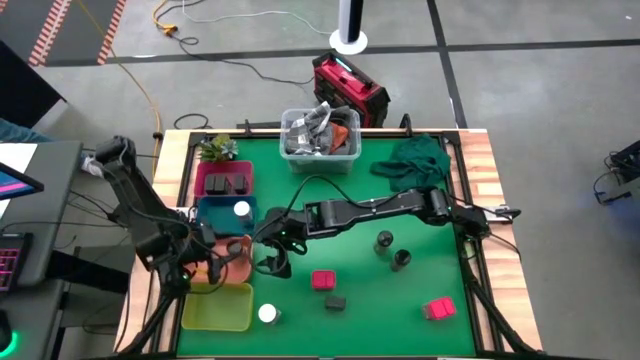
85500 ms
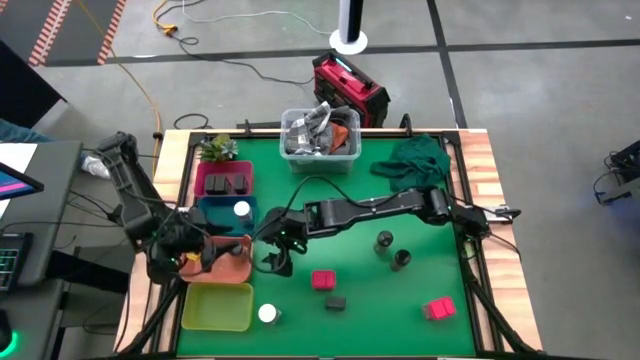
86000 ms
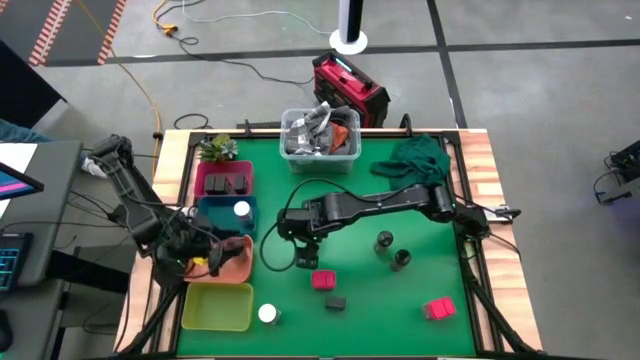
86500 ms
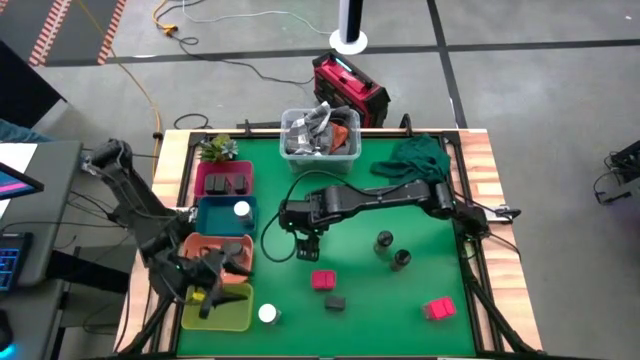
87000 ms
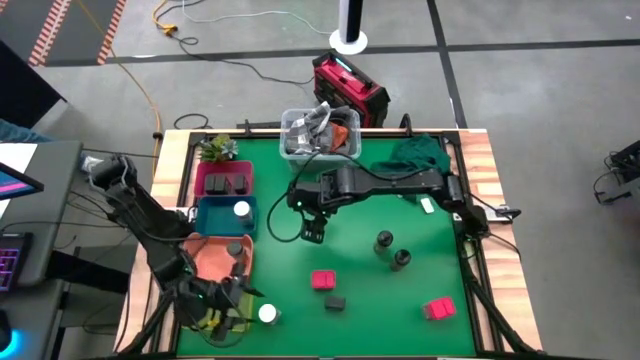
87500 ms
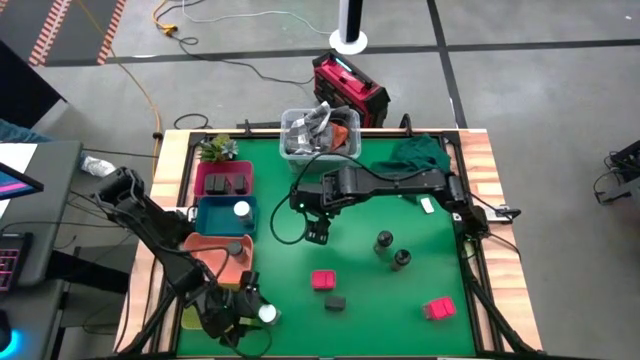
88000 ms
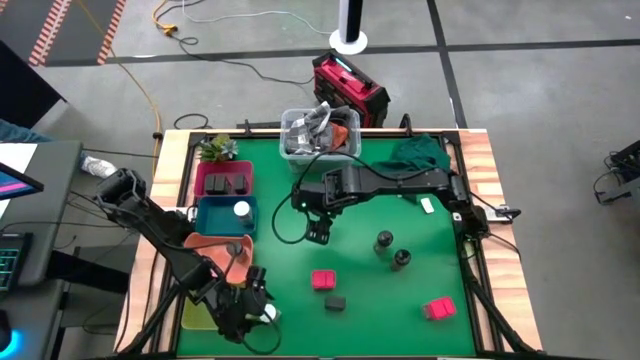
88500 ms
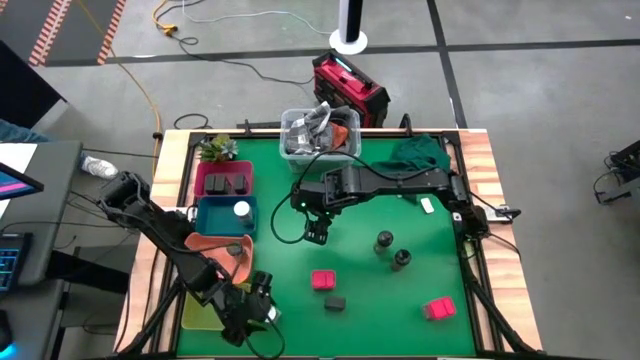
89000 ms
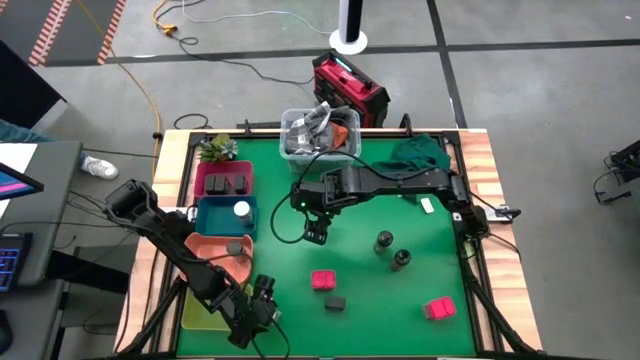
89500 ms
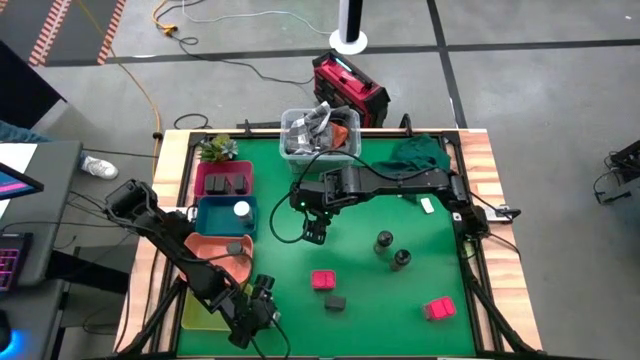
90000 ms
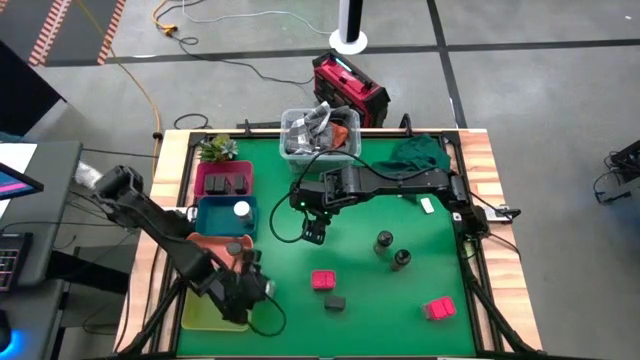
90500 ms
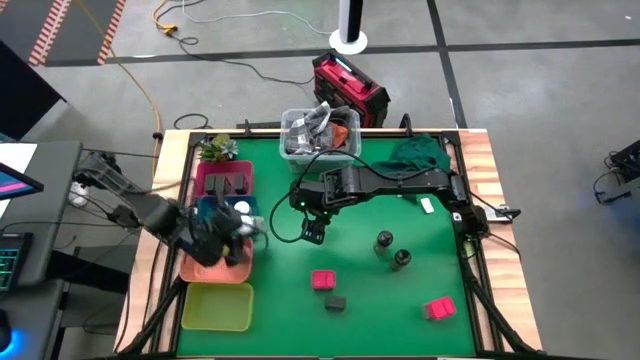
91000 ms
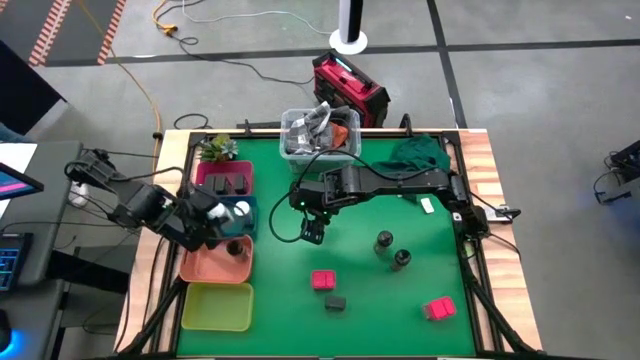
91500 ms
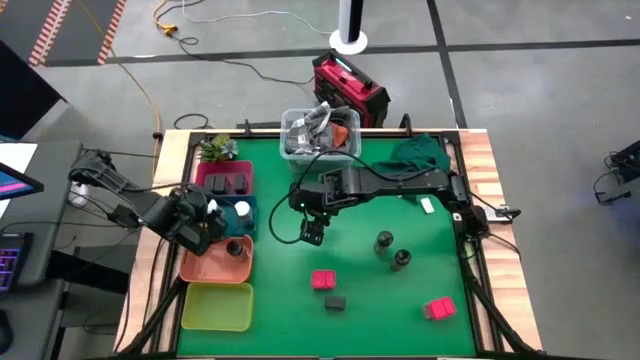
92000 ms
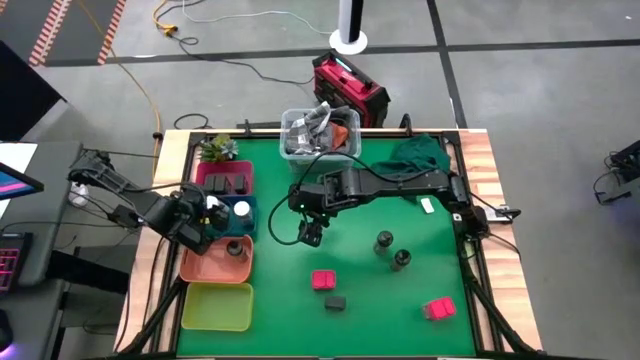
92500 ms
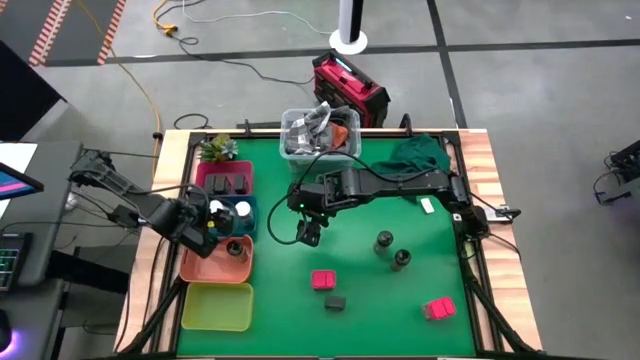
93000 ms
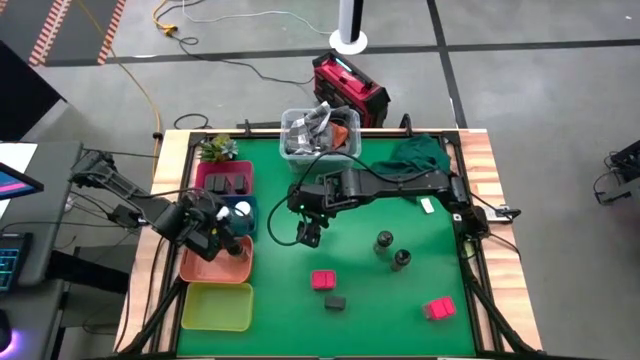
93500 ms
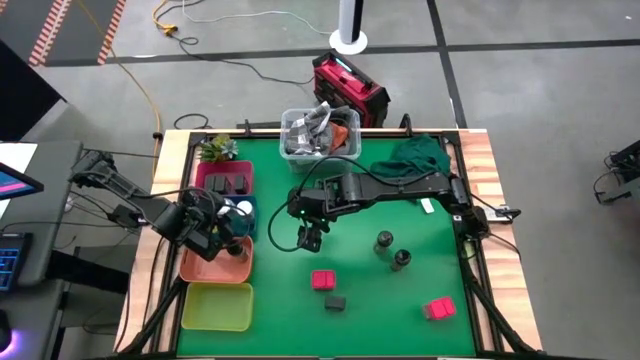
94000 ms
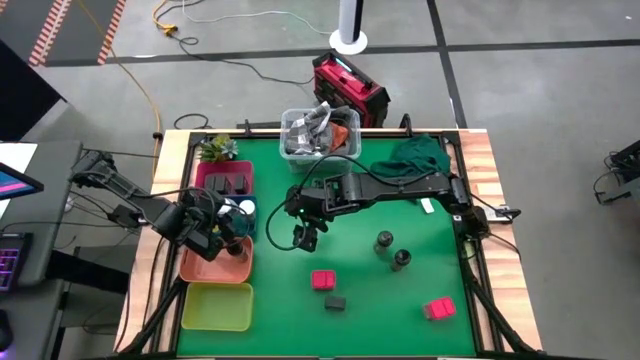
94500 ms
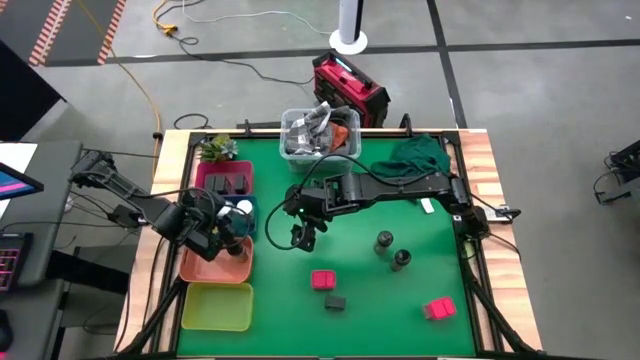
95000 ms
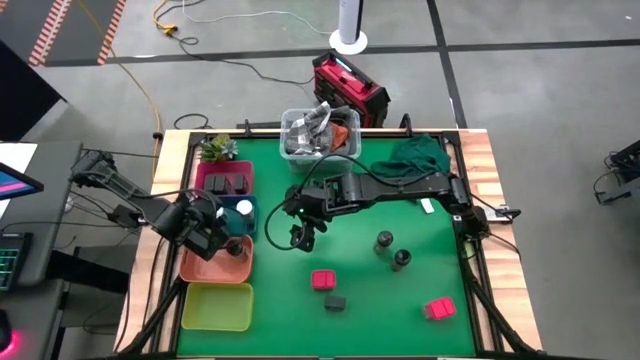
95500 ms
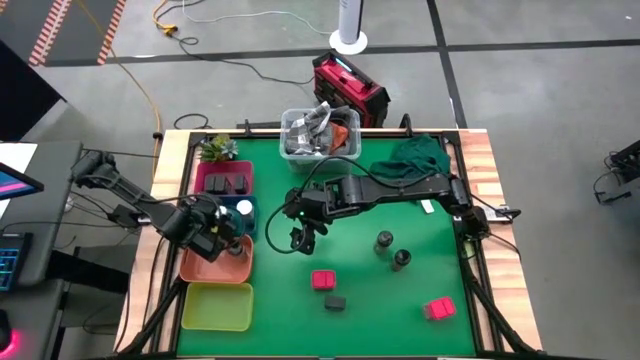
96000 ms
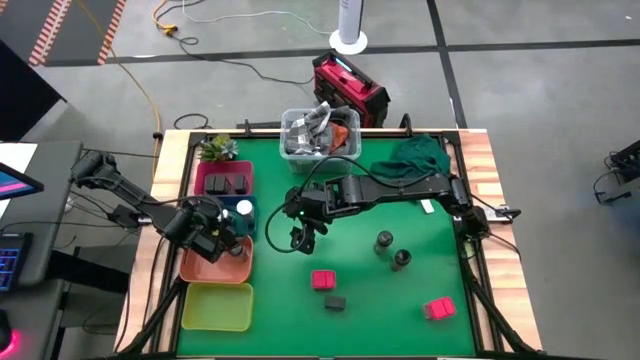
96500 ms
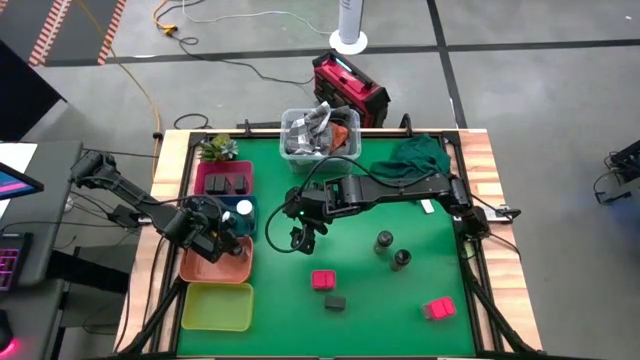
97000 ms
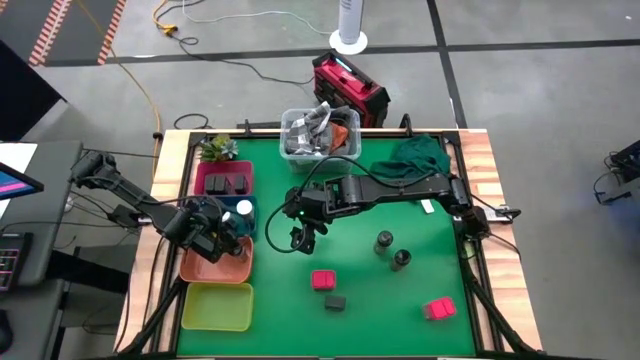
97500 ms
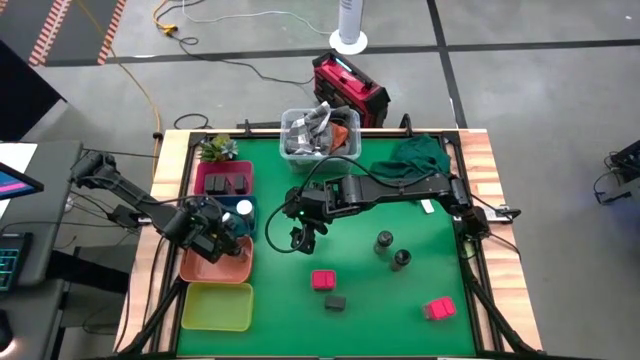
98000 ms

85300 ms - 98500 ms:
Task: Sort spices by type
Put the white seasoning bottle into the blue bin

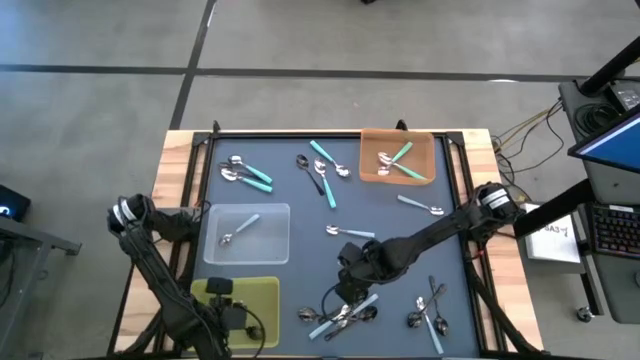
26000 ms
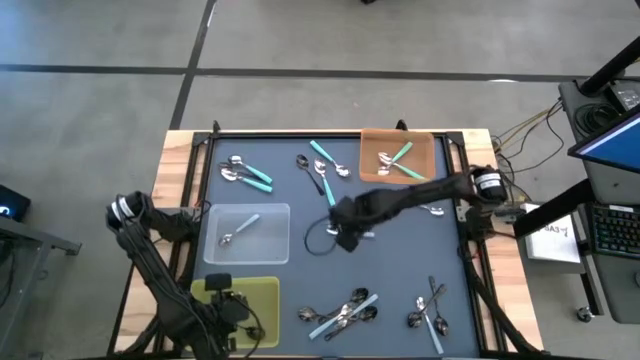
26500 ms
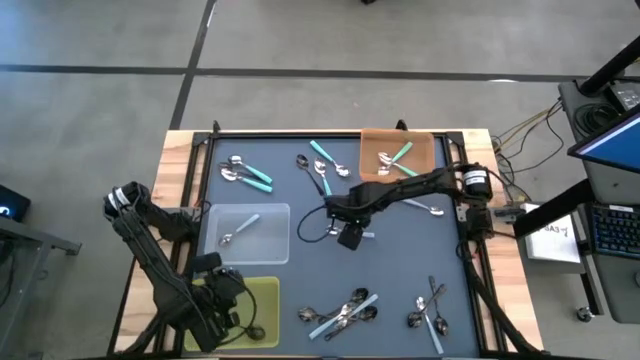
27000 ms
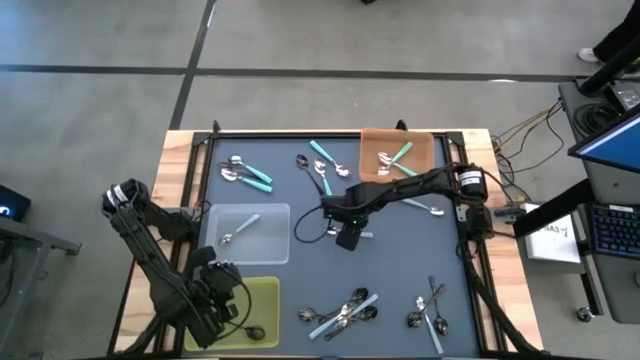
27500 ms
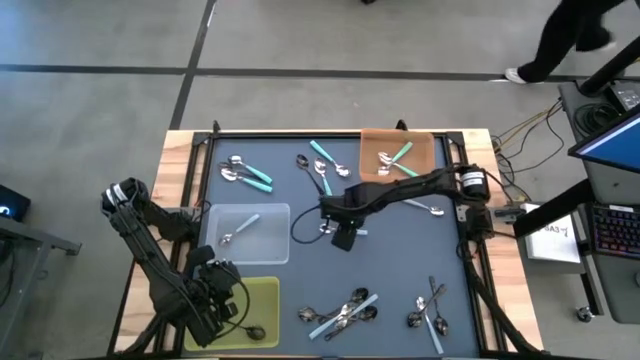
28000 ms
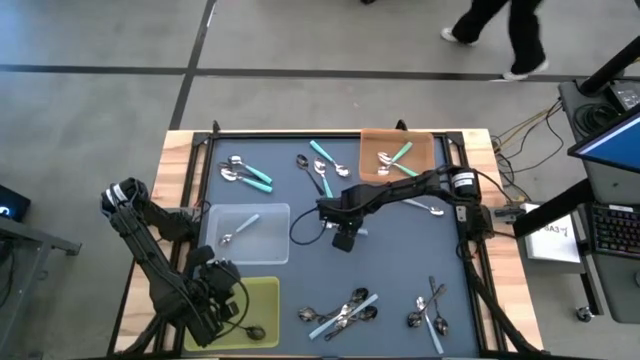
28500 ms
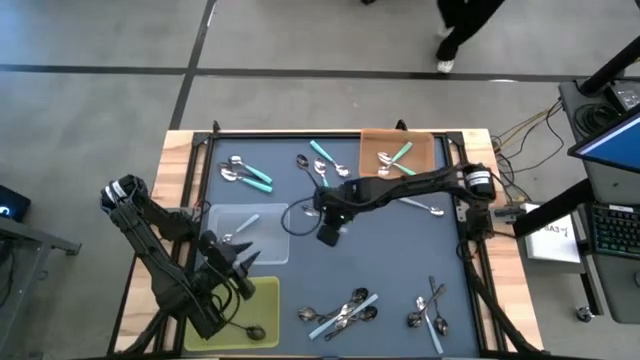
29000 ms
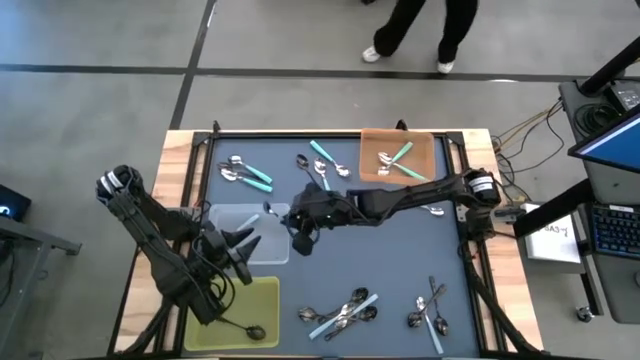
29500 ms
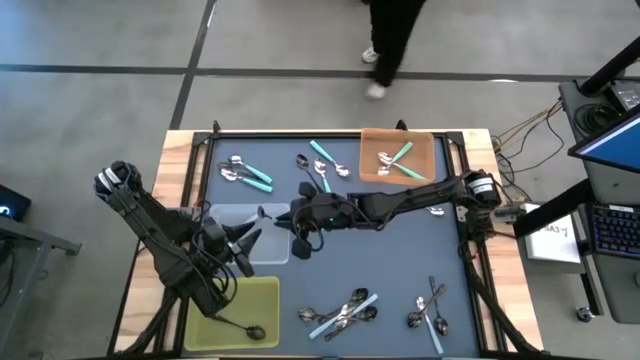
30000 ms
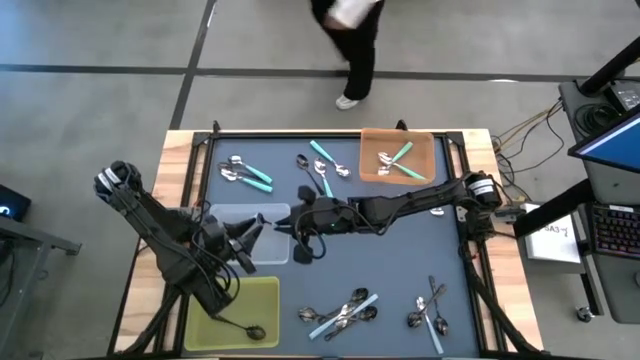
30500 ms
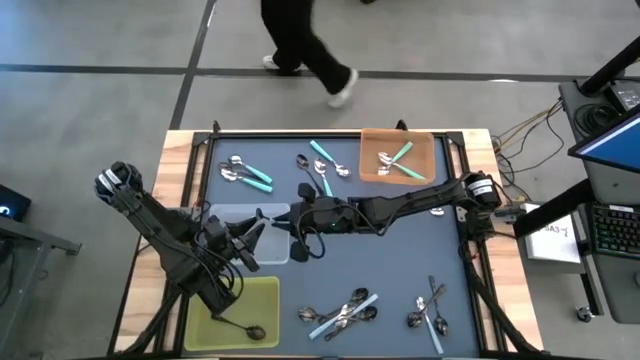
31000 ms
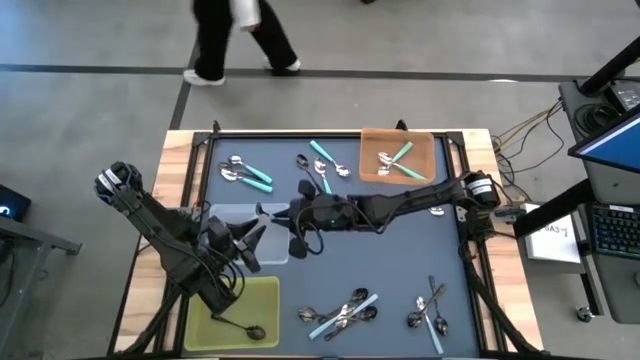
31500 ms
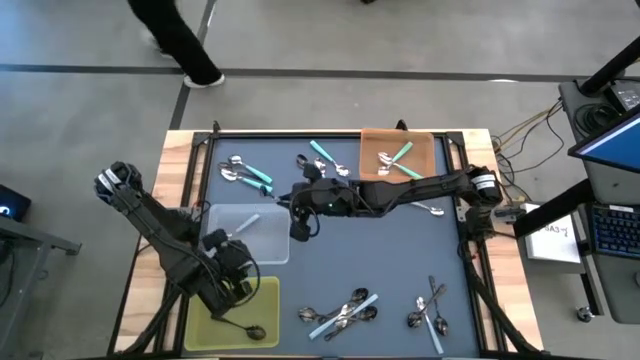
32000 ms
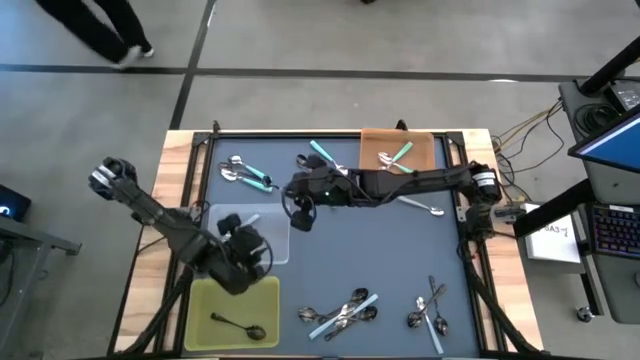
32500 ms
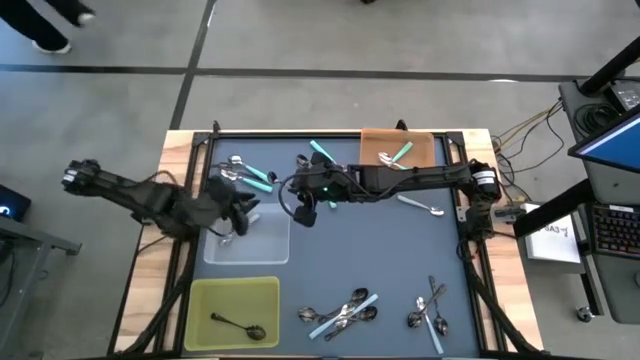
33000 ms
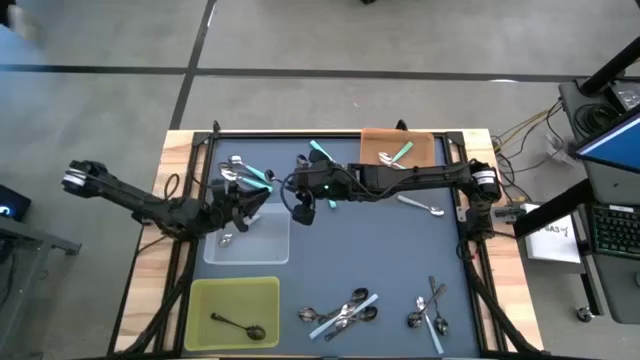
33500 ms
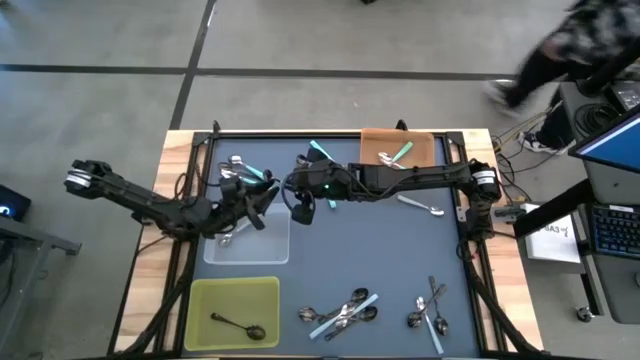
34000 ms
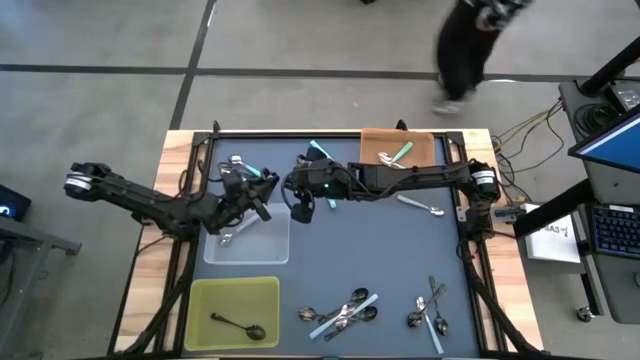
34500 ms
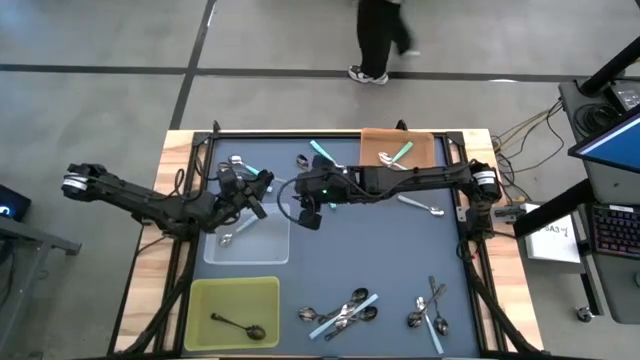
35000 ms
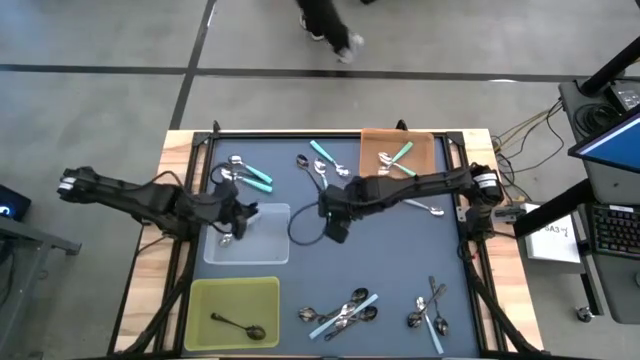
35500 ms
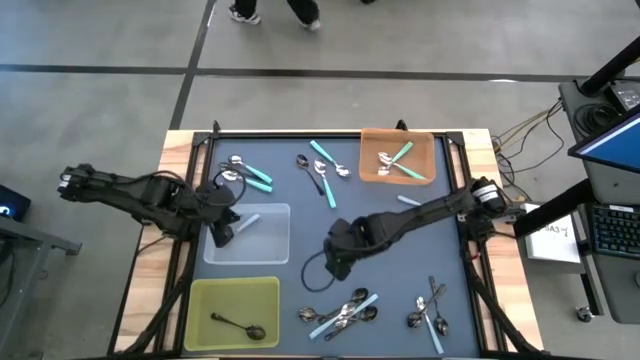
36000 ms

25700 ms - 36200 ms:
Task: Sort silverware by color (type)
Put the light blue spoon into the white bin
